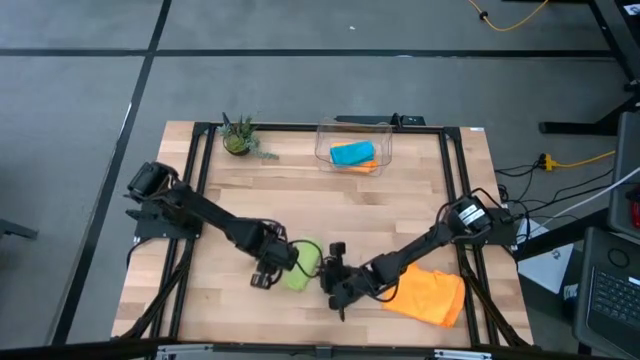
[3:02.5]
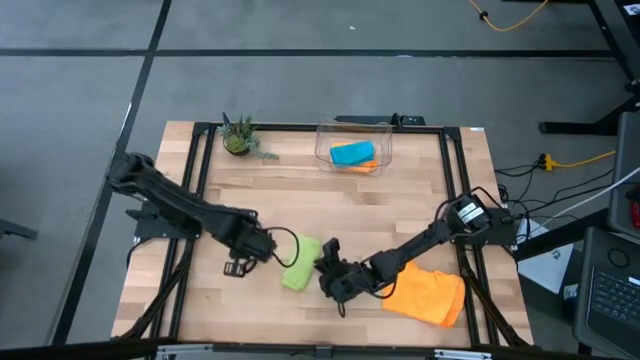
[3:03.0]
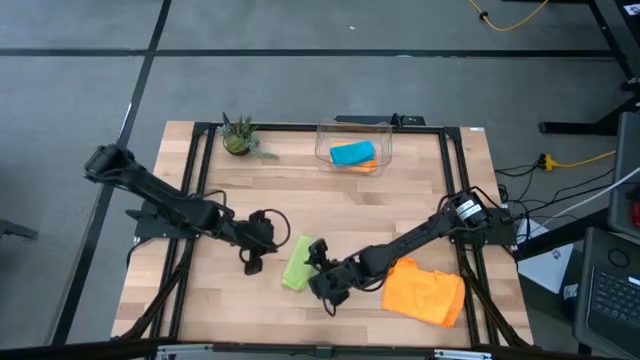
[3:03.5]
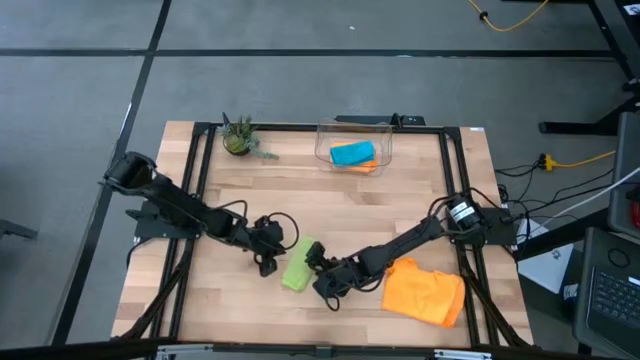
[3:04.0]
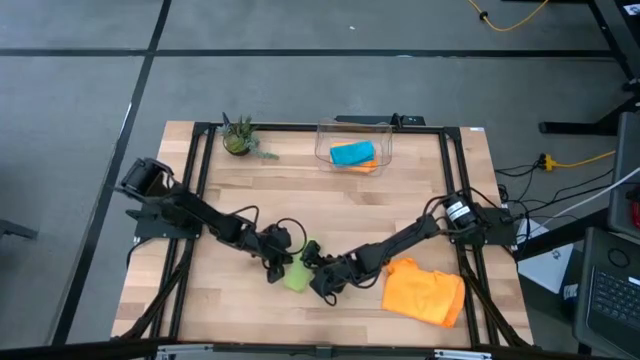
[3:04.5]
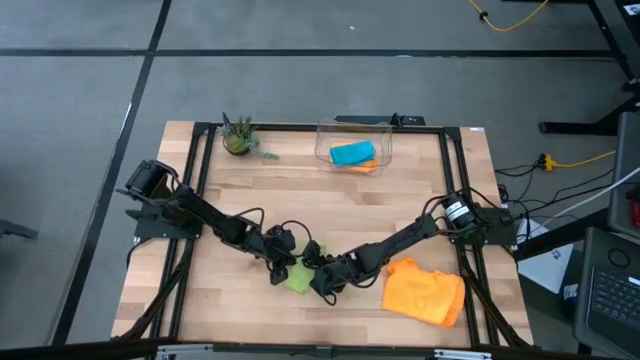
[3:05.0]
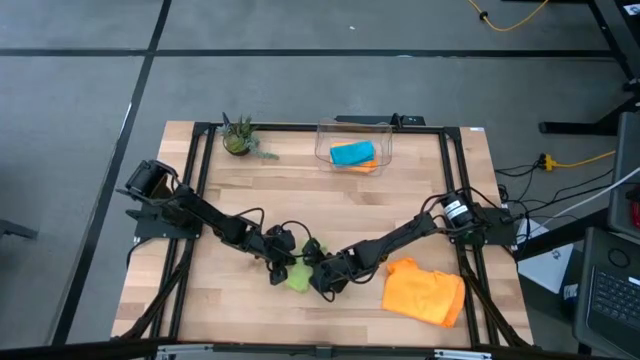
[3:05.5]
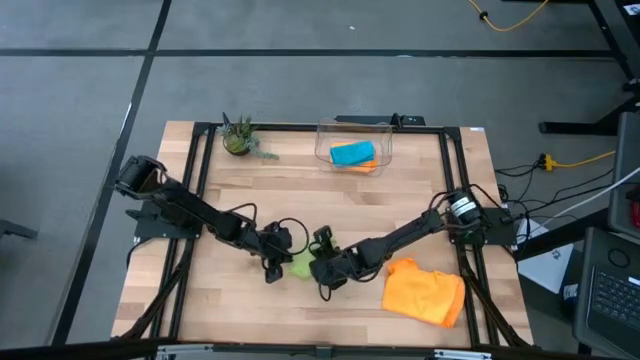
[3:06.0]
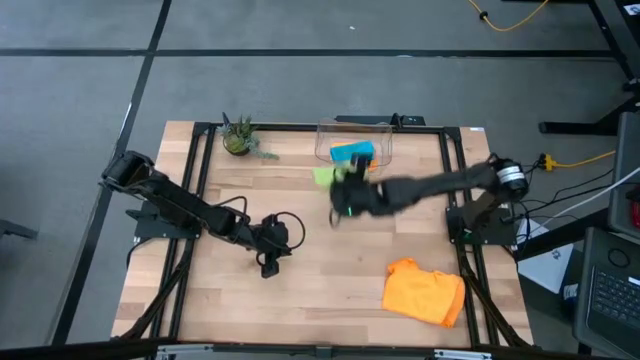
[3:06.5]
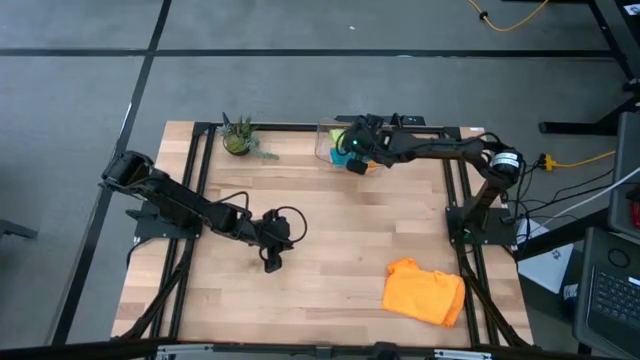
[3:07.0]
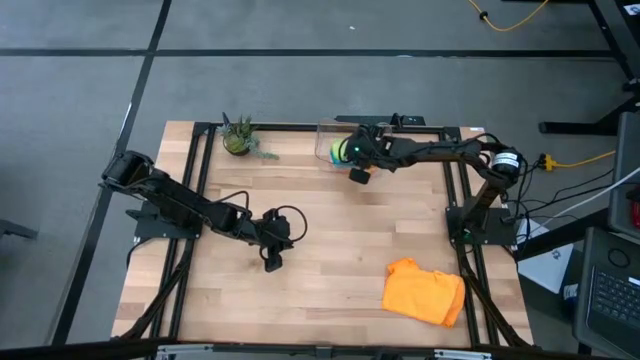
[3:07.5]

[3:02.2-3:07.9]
Task: Fold microfiber towels
Put the green towel into the transparent bin

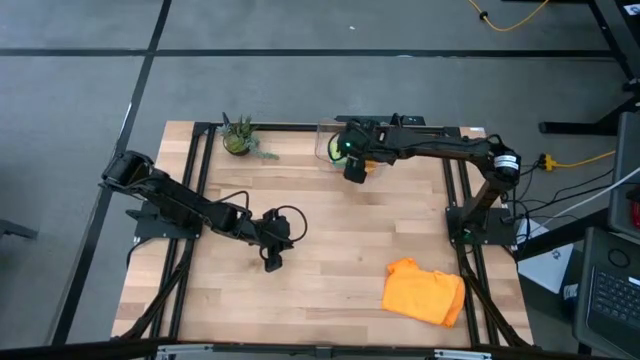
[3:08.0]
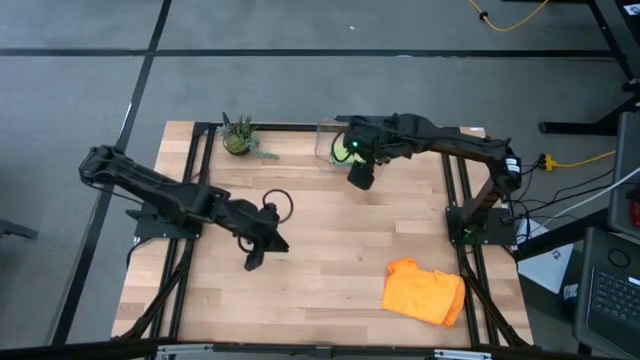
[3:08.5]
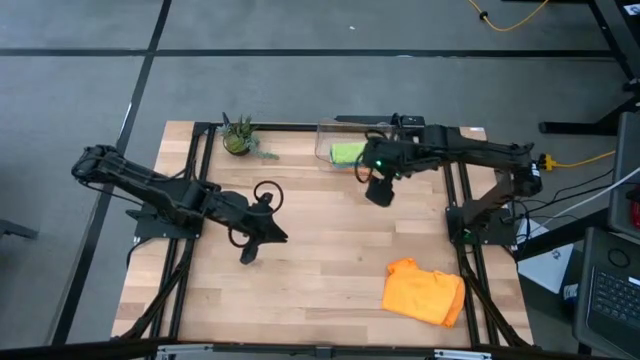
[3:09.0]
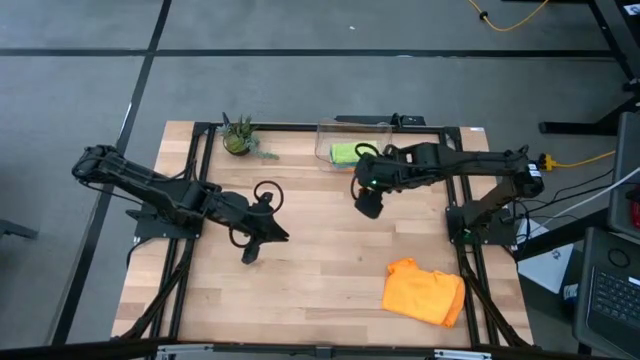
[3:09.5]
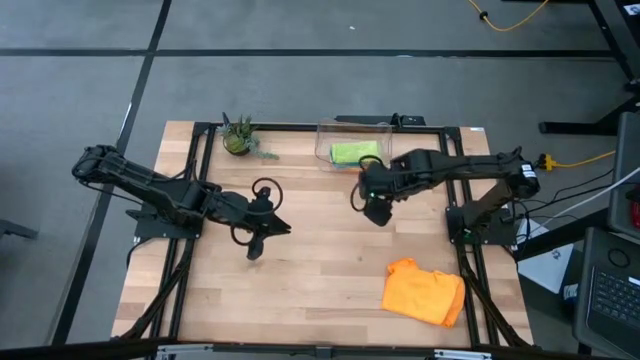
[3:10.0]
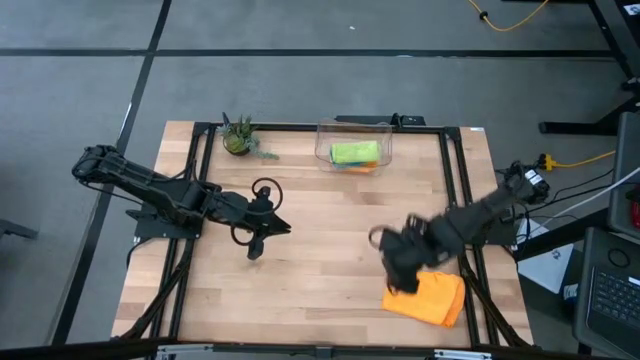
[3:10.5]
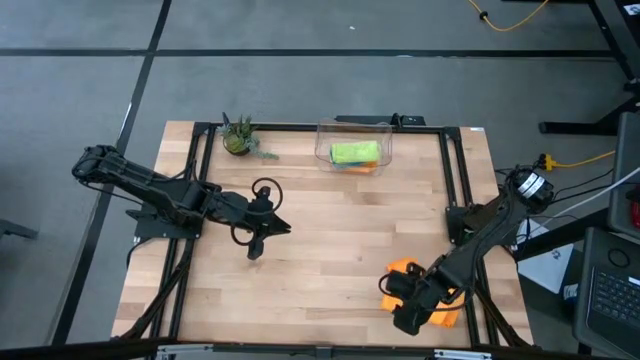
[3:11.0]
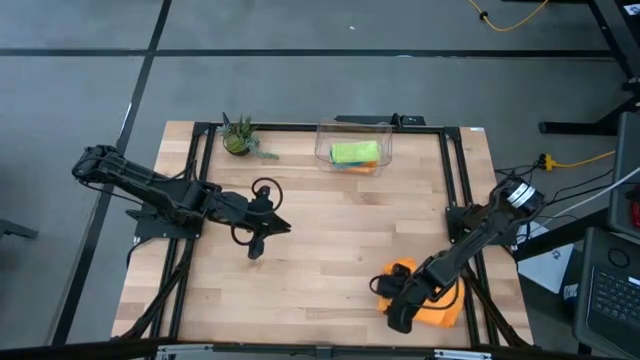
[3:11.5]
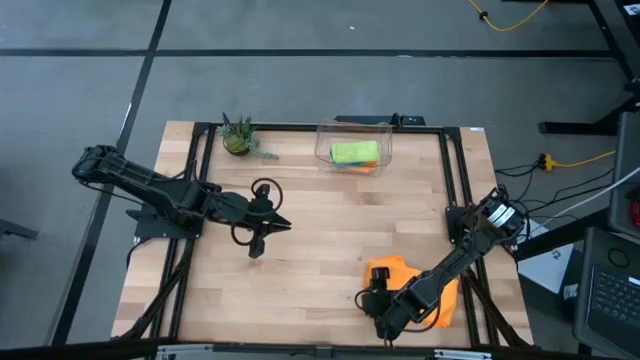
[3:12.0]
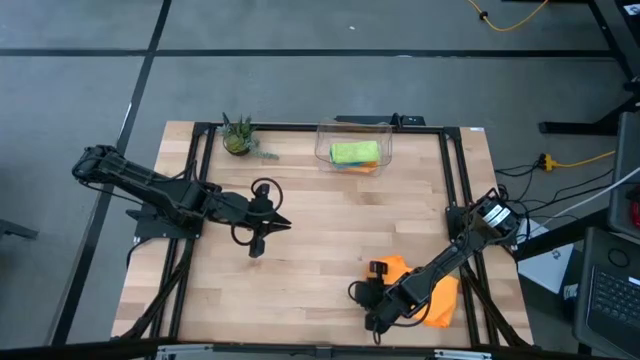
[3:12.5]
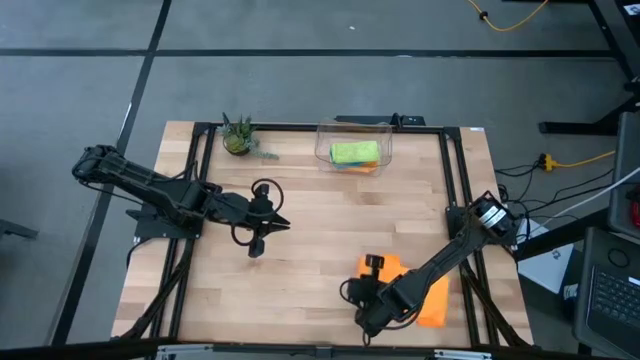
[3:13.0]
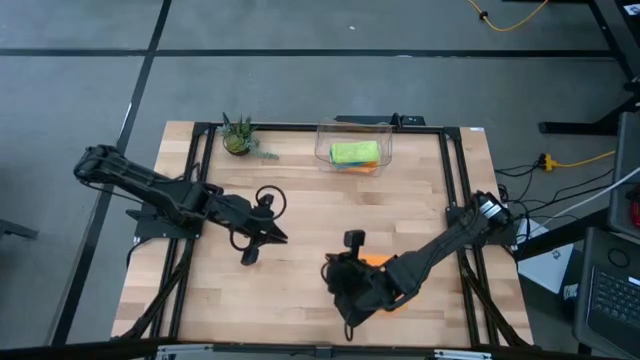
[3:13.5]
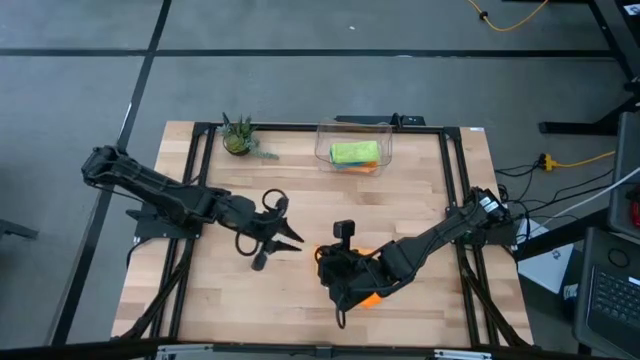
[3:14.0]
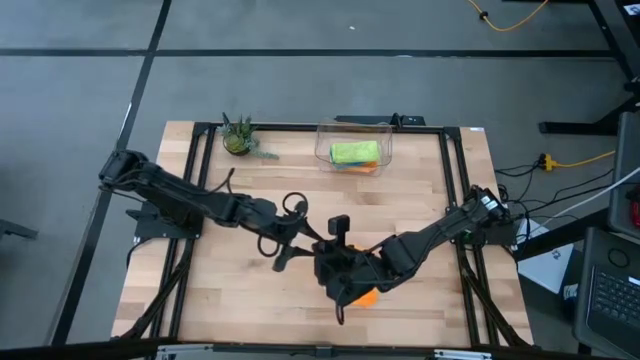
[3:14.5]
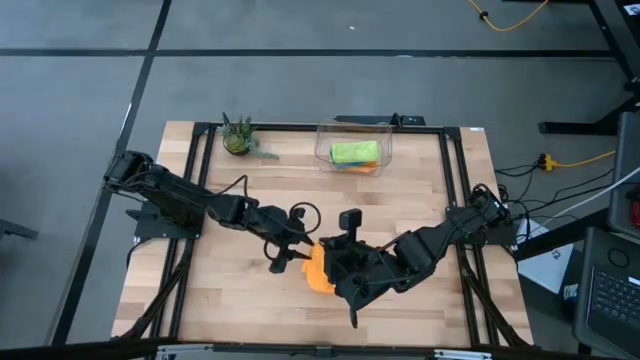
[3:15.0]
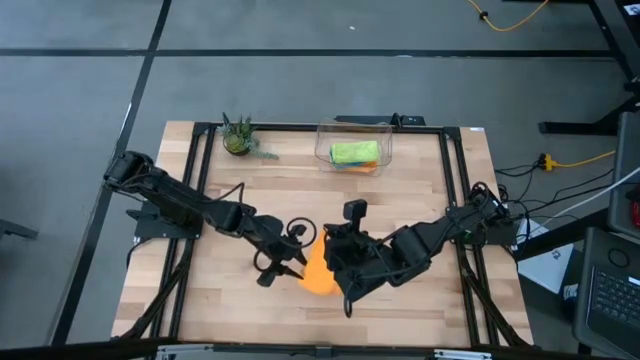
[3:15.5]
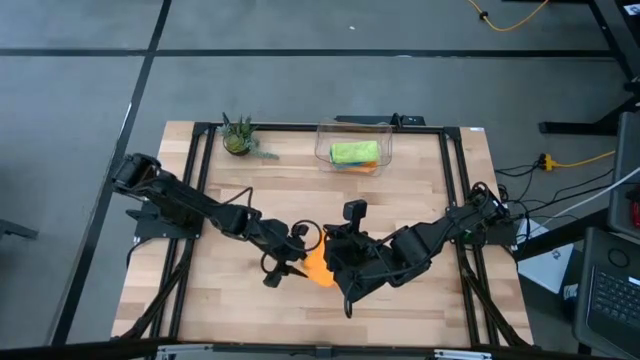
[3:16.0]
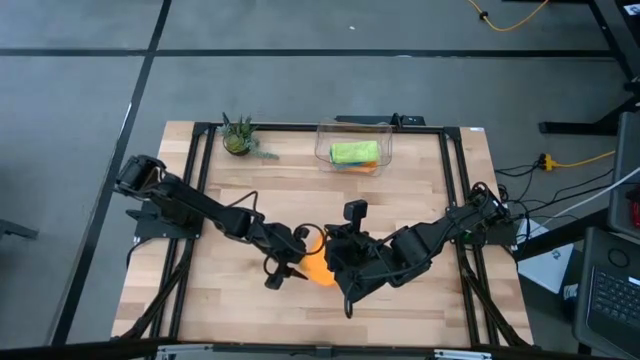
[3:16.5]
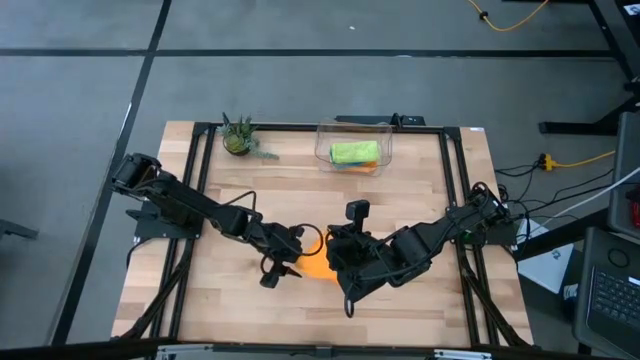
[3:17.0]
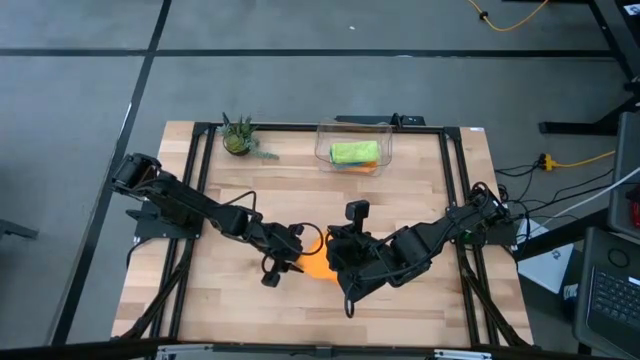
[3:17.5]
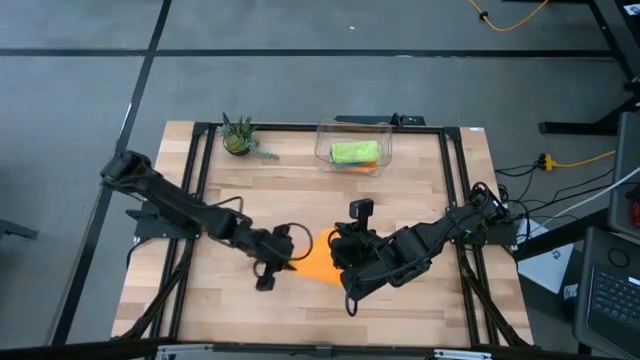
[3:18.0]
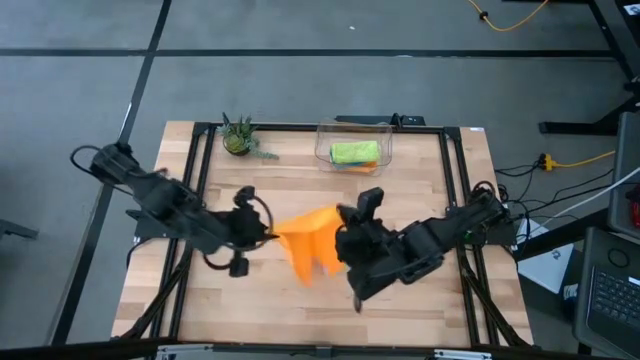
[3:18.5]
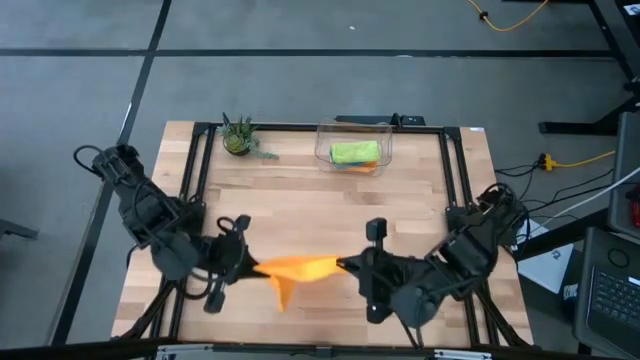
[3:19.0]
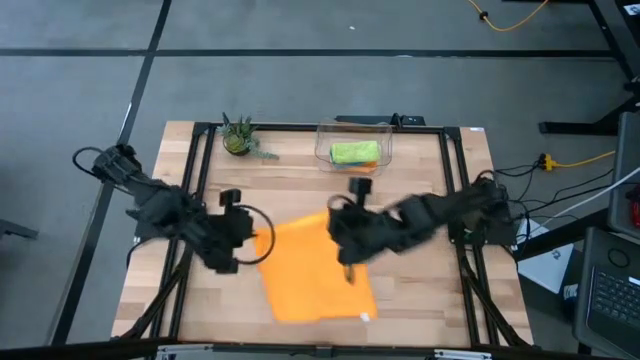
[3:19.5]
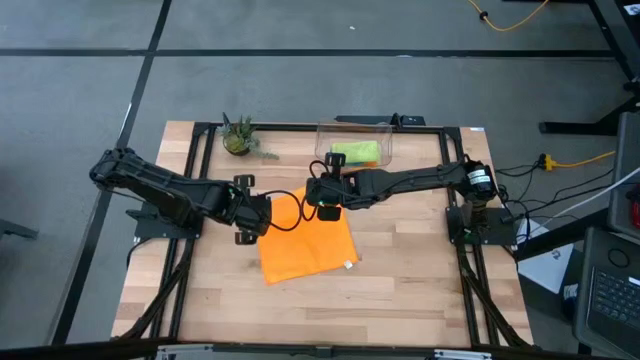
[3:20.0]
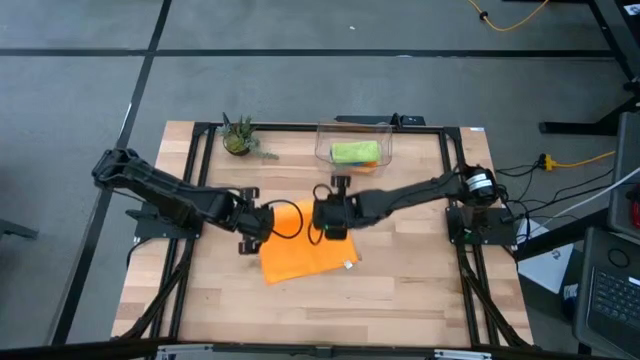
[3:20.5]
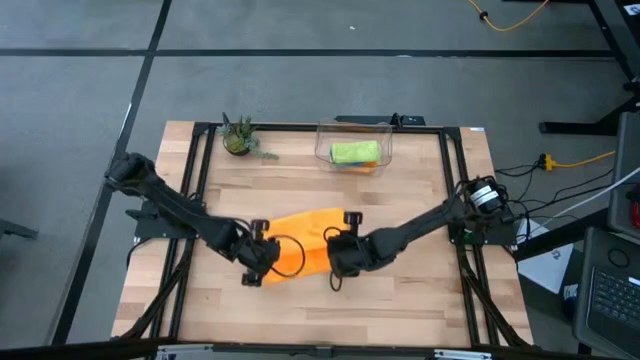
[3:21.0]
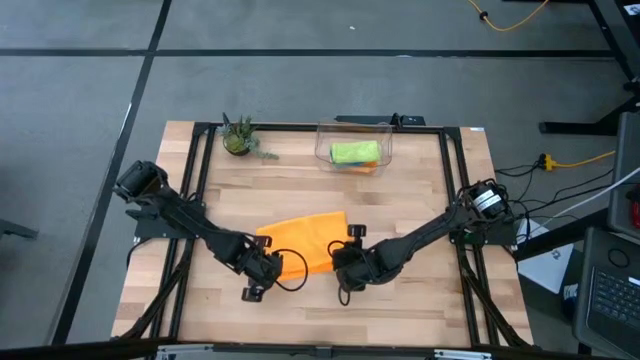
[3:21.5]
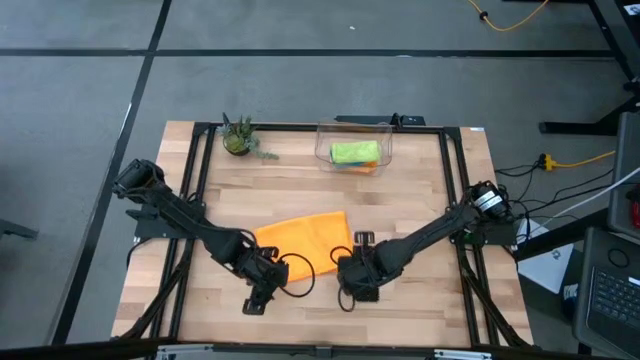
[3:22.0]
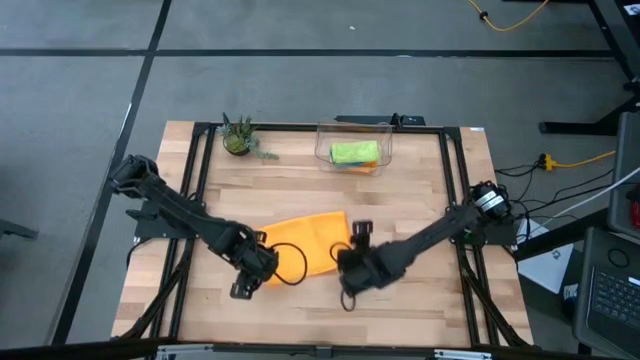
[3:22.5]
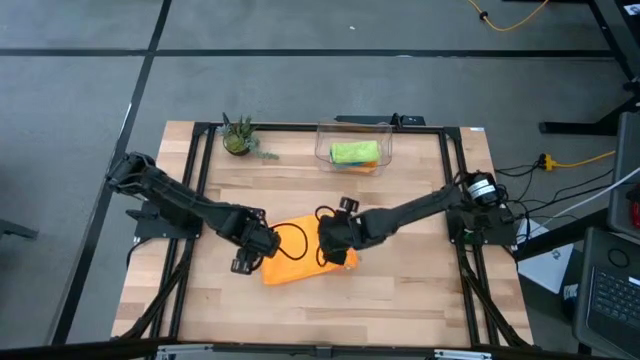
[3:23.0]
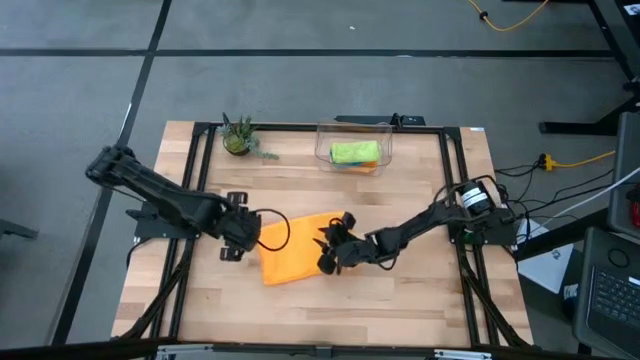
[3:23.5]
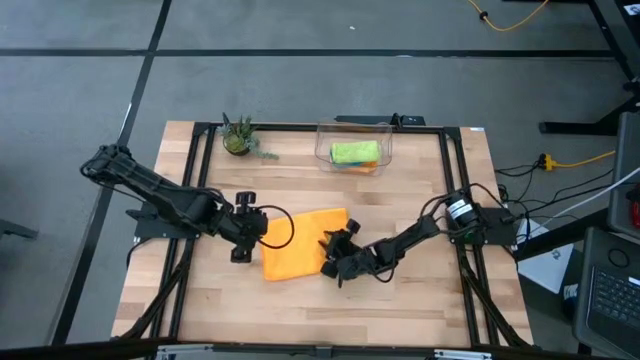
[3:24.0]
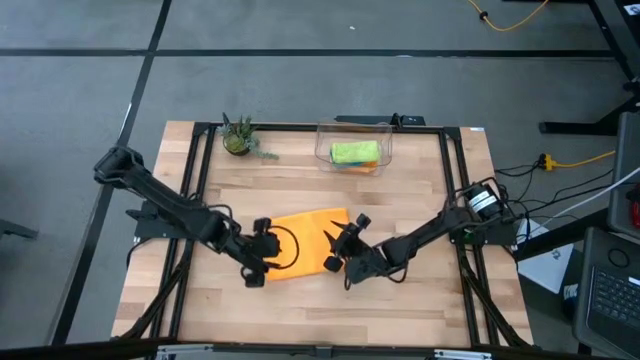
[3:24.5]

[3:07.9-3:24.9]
Fold the orange towel on the table
